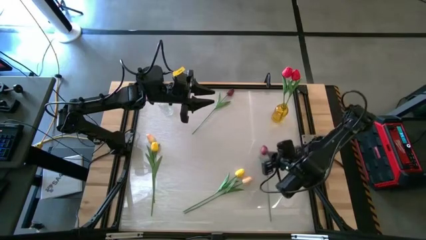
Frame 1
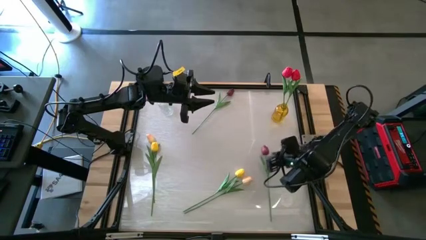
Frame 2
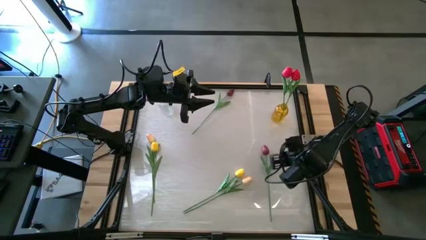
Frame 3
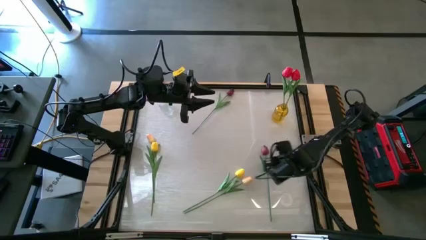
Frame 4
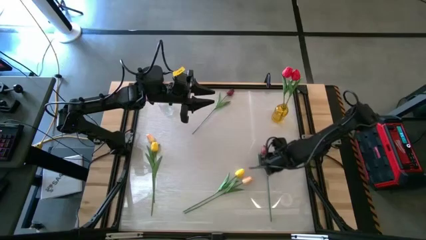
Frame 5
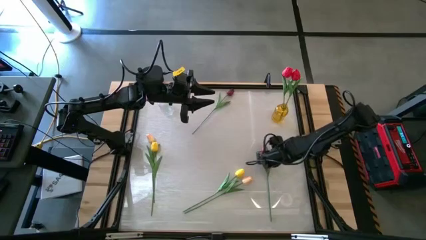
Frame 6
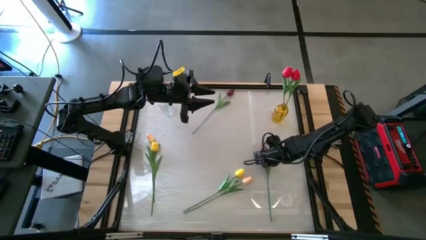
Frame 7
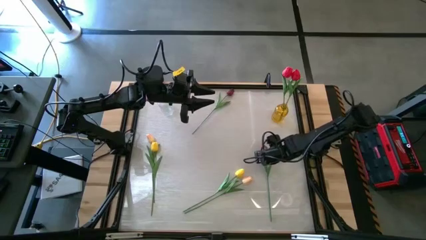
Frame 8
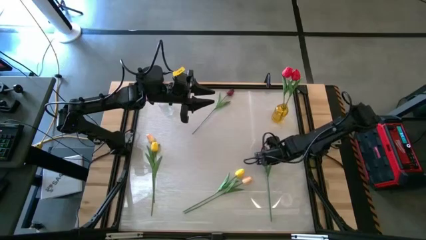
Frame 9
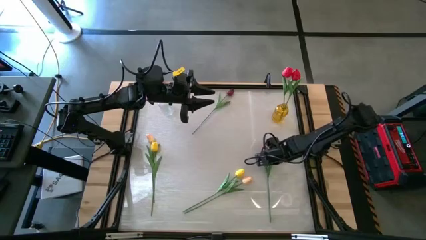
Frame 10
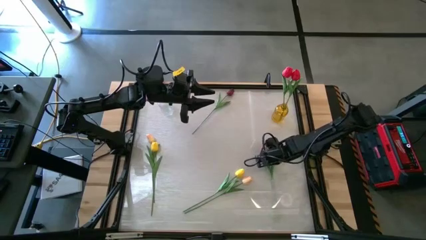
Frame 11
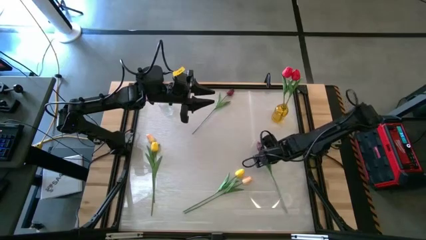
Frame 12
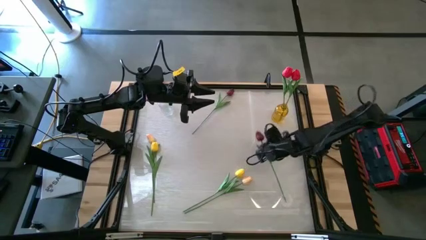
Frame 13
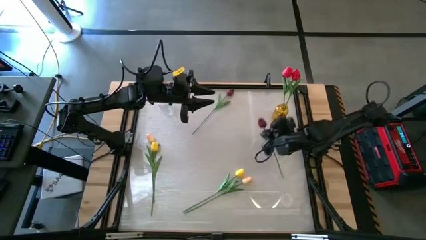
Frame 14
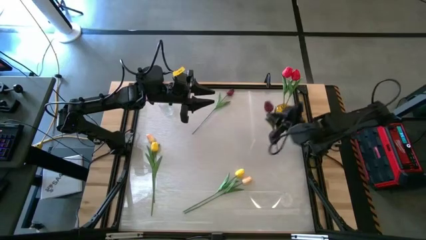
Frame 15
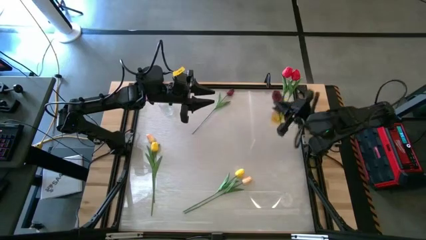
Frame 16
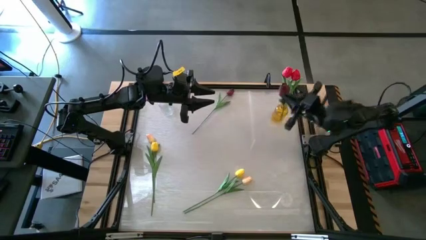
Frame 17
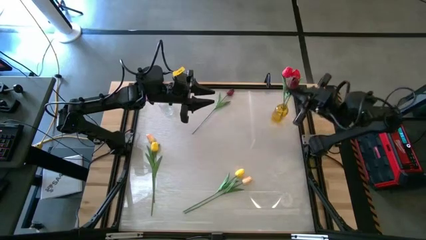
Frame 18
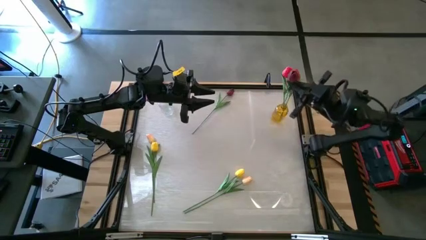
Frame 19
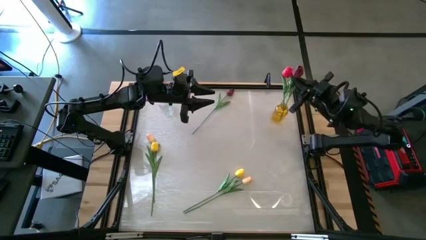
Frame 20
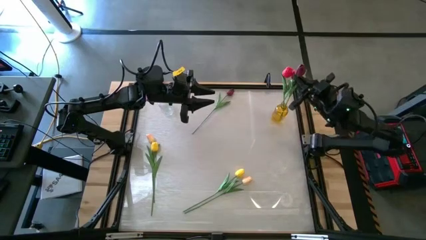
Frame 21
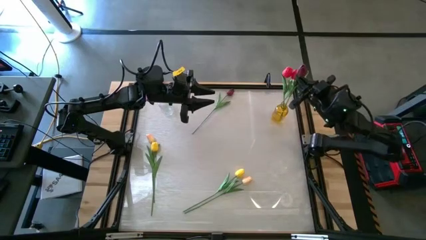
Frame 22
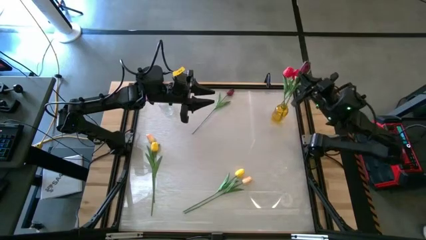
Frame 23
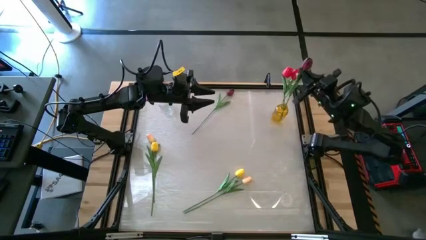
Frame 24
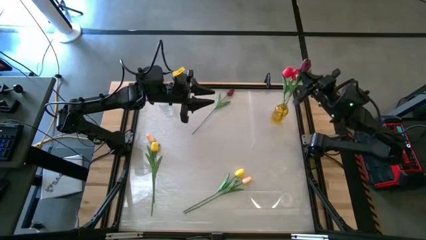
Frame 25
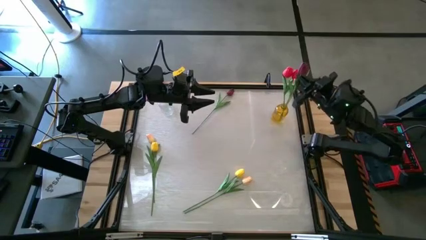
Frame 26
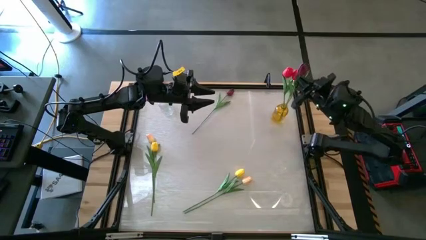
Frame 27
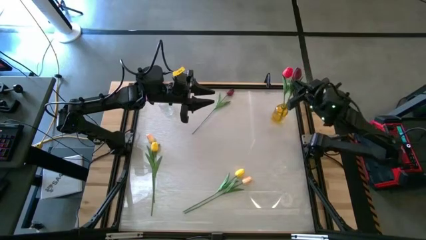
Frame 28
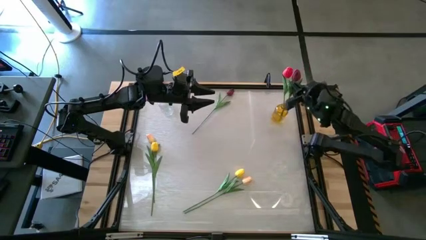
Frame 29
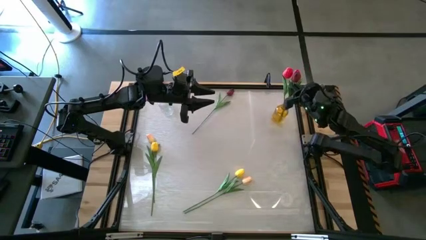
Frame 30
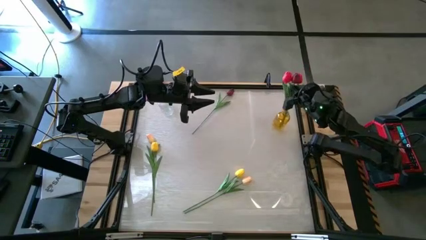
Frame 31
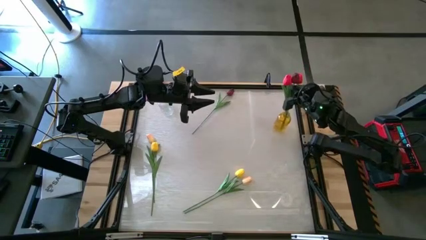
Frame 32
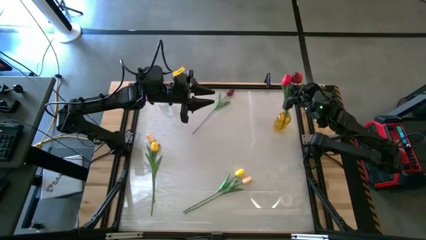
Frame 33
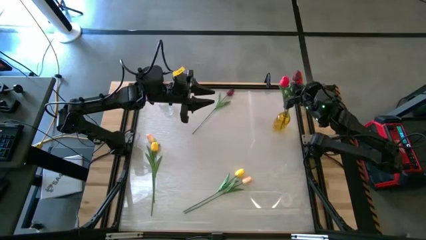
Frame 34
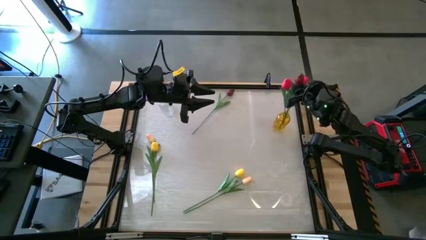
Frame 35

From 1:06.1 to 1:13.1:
Task: Sort flowers into vase by color
Put the bottom dark red tulip into the yellow vase

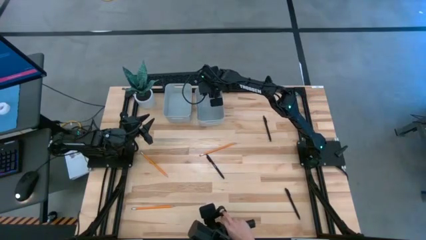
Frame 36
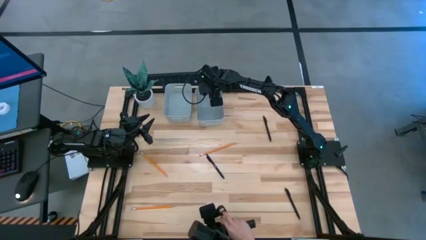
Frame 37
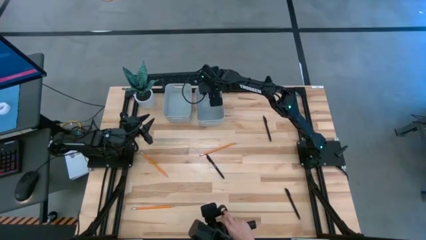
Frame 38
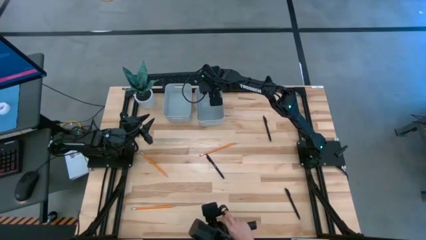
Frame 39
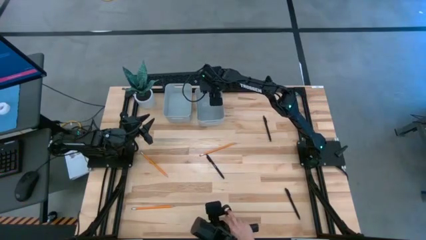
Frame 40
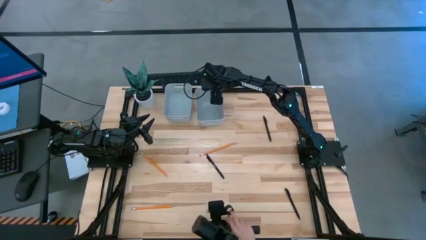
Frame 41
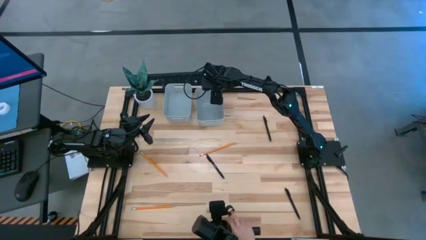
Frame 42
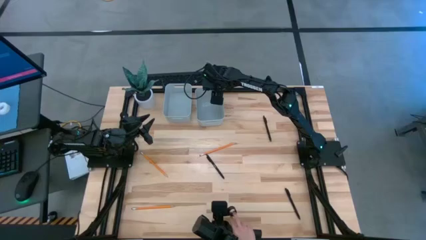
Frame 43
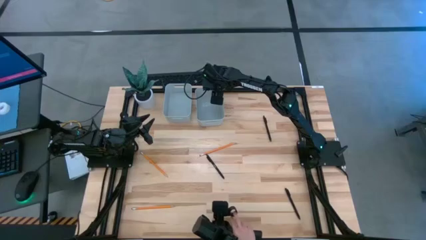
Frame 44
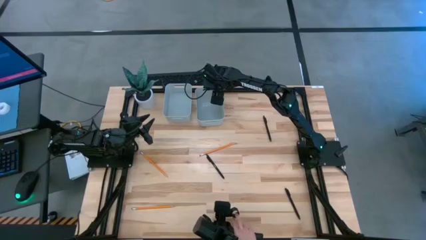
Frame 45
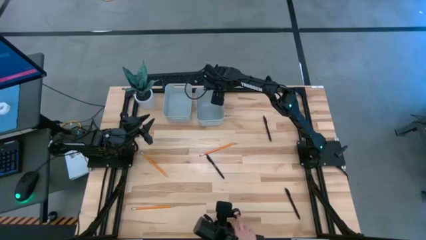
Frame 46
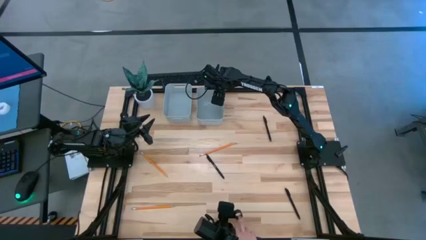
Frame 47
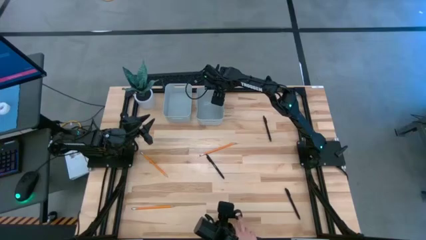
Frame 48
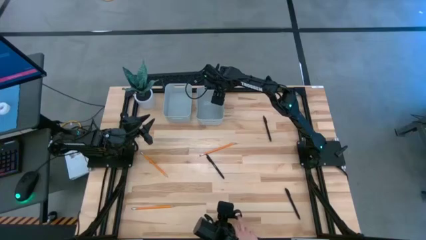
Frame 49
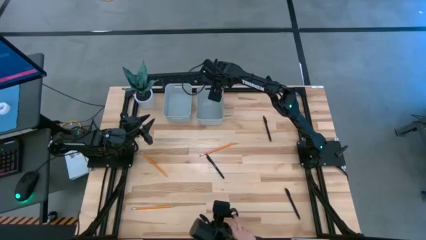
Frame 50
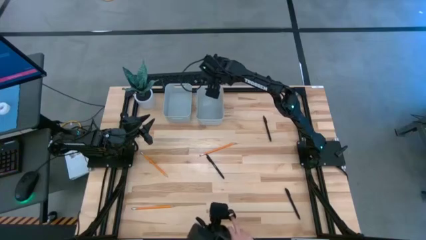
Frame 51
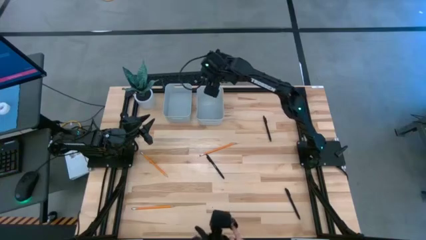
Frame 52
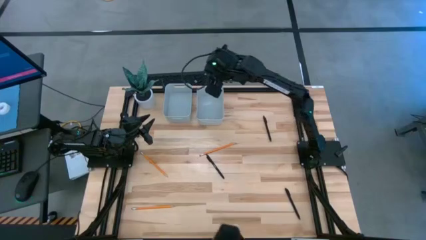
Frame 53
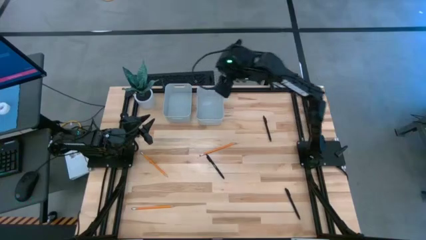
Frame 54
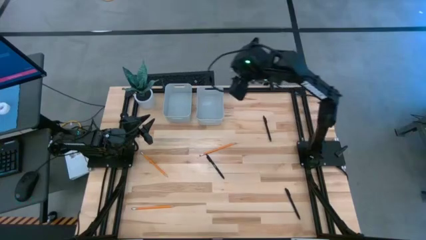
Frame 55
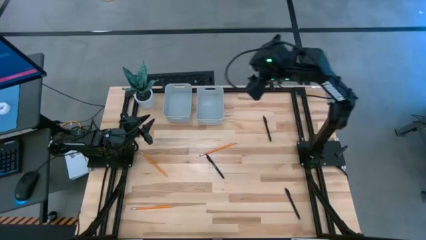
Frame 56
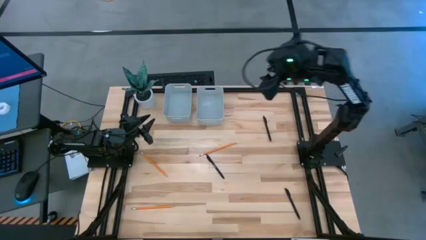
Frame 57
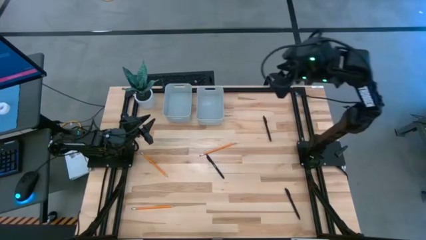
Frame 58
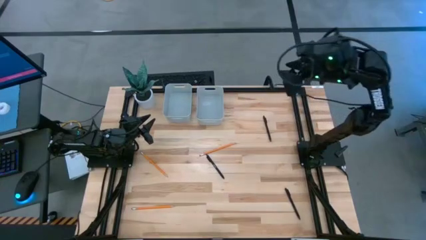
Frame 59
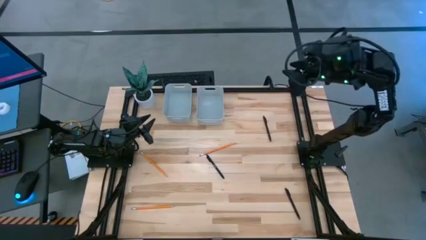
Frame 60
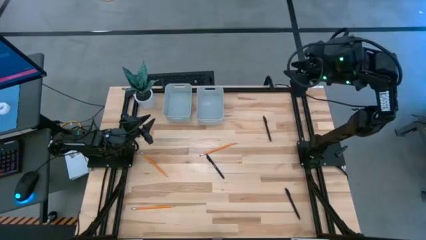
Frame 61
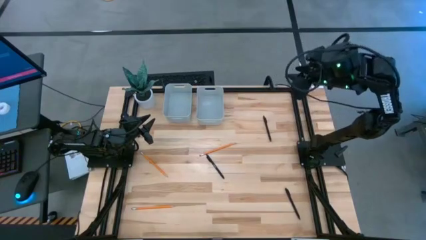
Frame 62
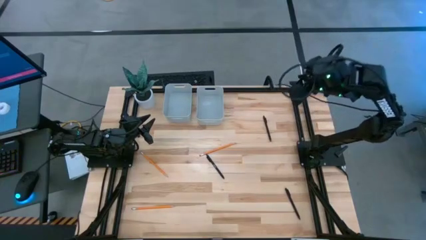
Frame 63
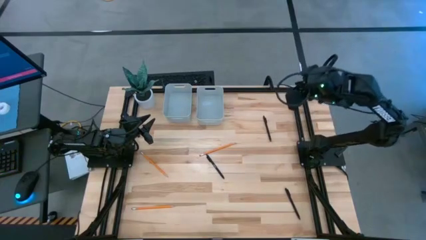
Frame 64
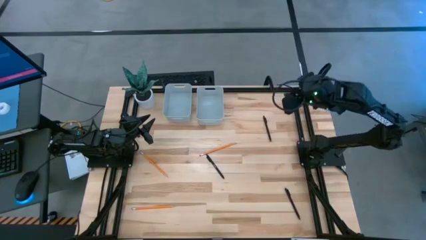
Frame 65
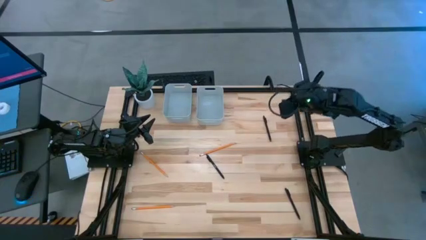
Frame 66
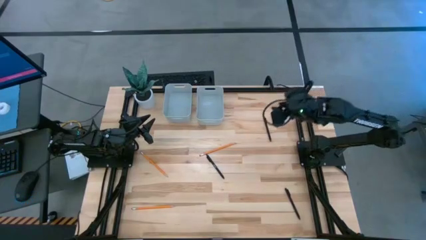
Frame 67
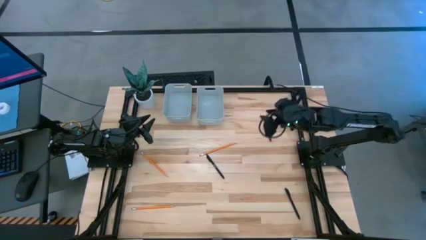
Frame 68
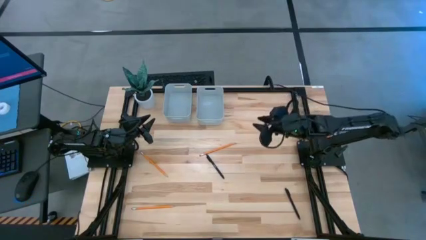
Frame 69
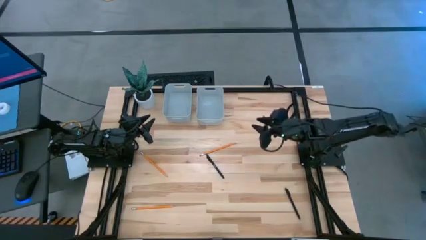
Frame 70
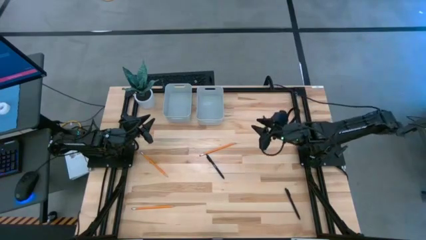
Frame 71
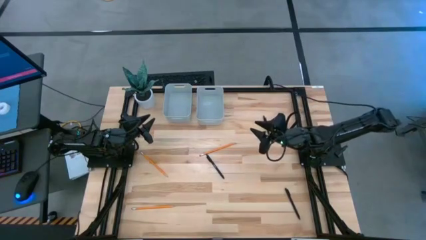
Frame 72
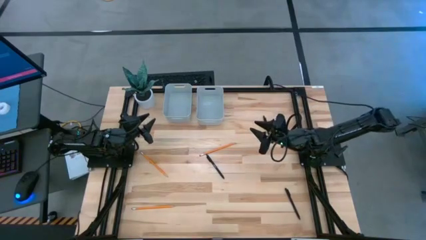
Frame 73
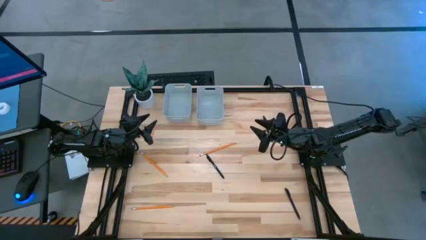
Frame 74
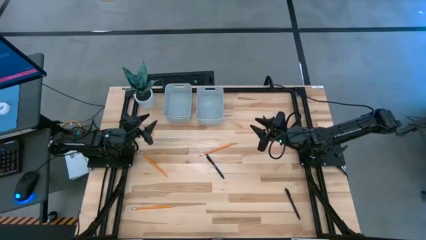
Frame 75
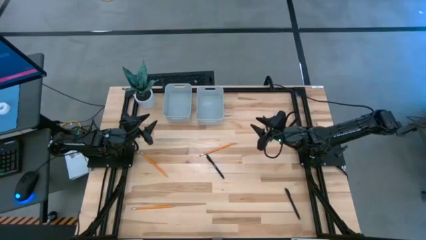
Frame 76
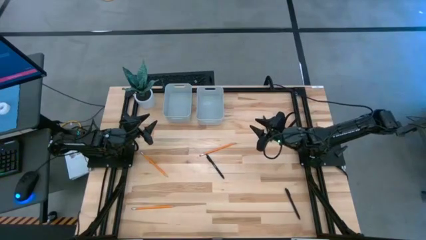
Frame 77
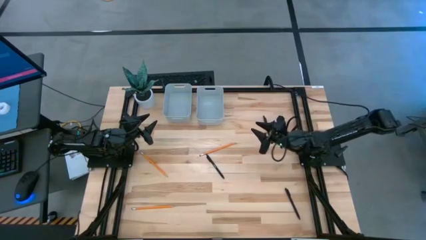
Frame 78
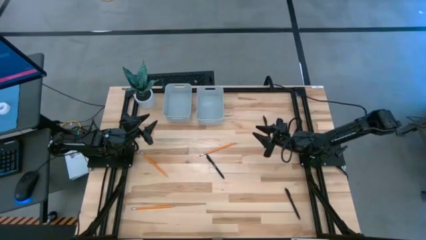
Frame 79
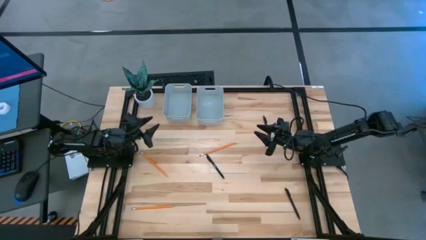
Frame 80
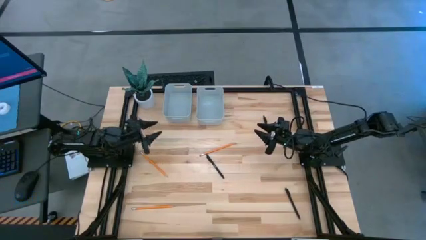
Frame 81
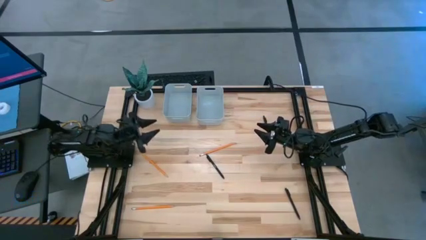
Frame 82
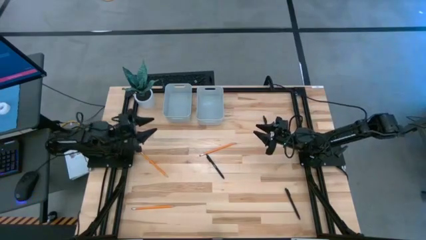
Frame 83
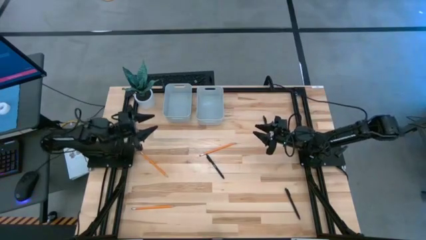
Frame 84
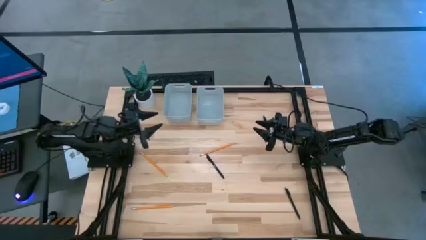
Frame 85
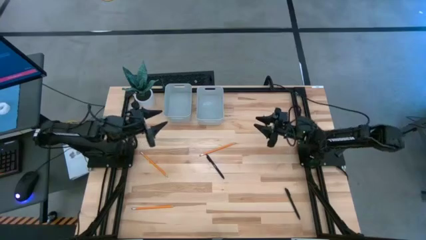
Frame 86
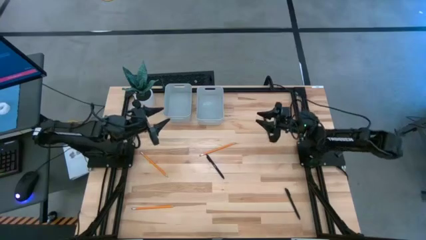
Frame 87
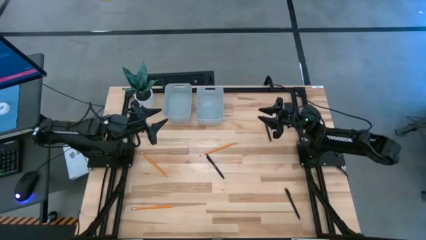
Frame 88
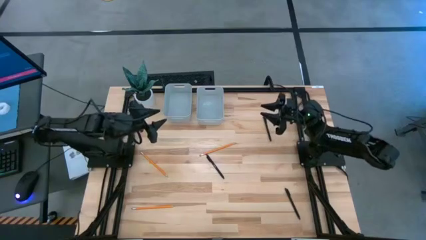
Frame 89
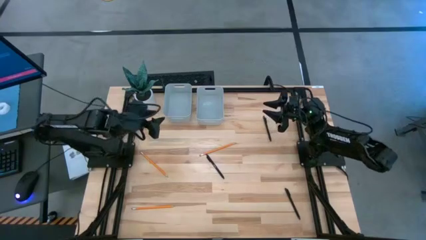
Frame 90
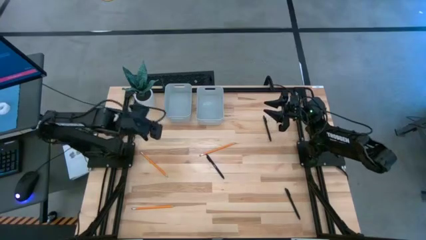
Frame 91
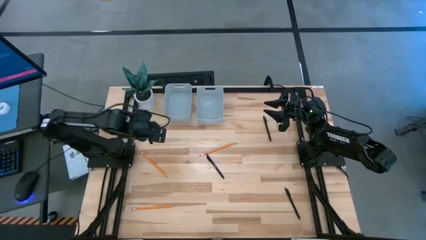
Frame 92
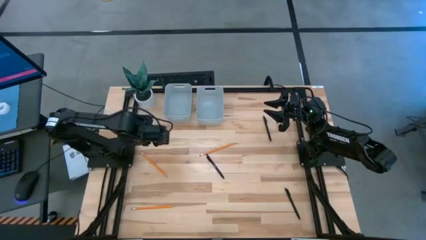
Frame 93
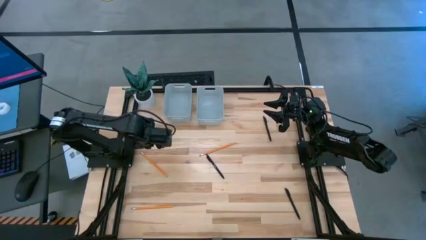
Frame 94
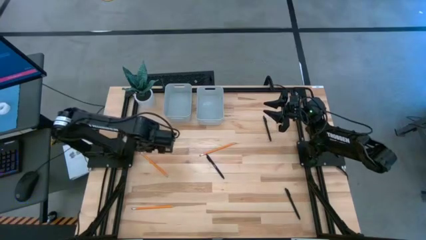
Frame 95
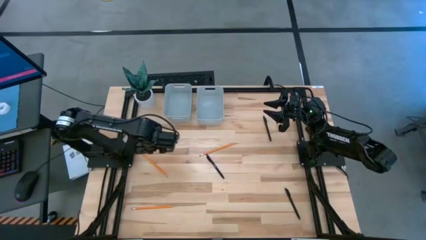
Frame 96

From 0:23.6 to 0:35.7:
Task: Sort pens & pencils
Put the middle left pencil into the left bin
